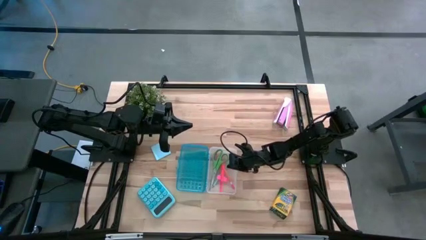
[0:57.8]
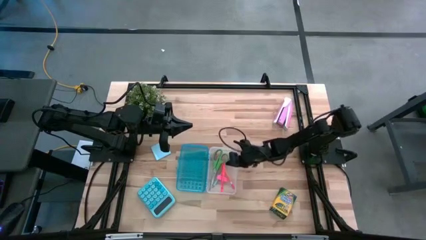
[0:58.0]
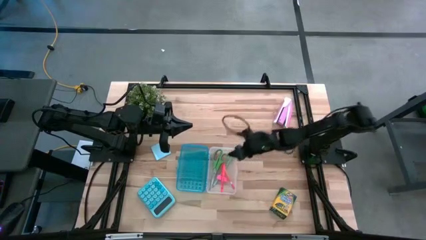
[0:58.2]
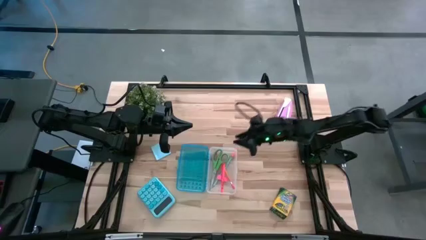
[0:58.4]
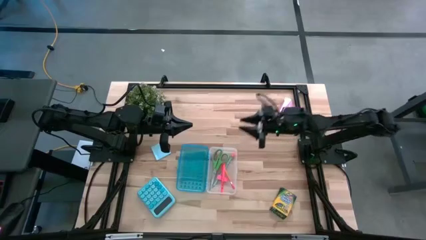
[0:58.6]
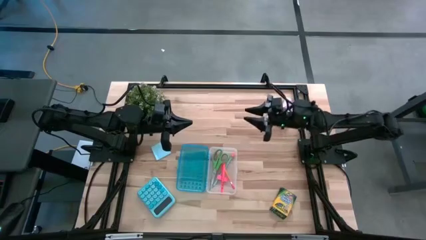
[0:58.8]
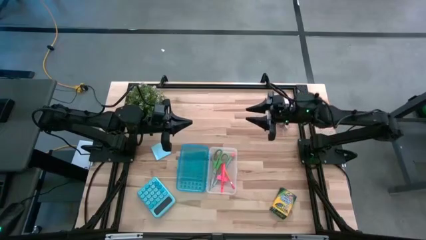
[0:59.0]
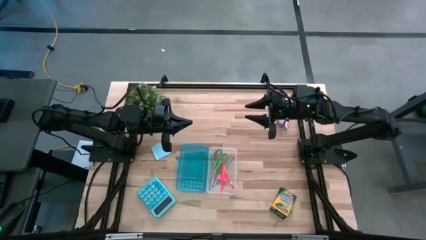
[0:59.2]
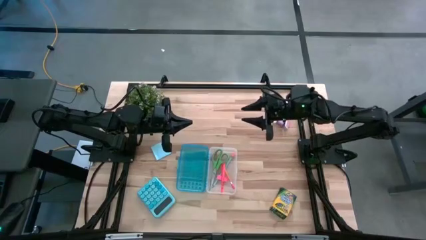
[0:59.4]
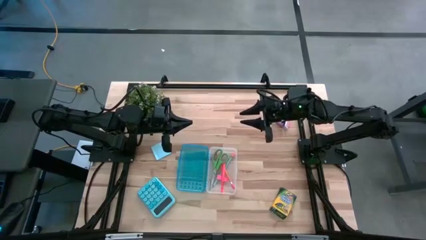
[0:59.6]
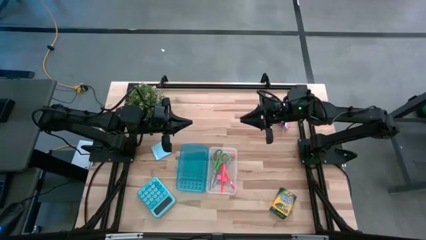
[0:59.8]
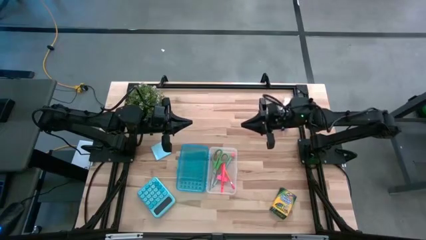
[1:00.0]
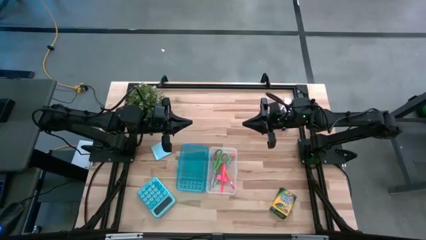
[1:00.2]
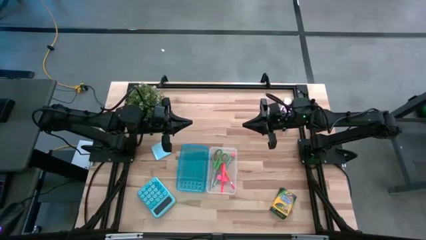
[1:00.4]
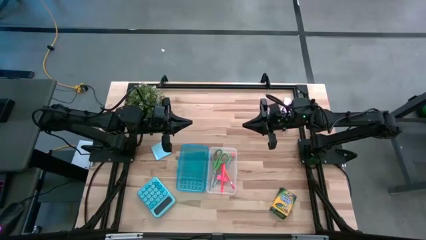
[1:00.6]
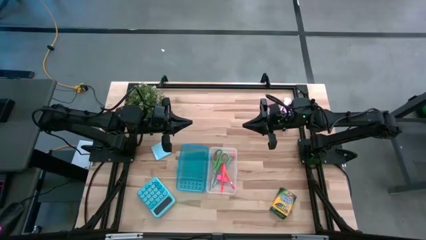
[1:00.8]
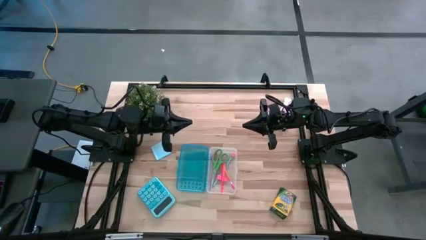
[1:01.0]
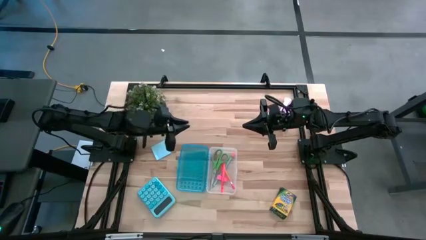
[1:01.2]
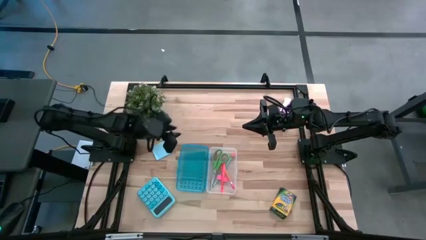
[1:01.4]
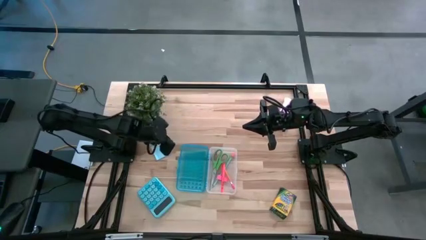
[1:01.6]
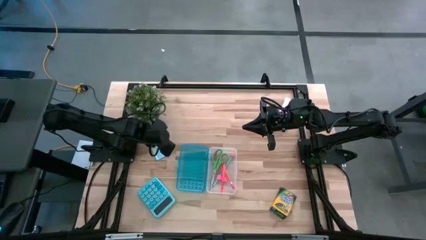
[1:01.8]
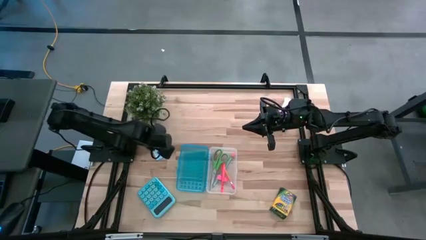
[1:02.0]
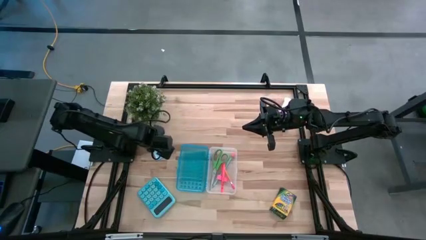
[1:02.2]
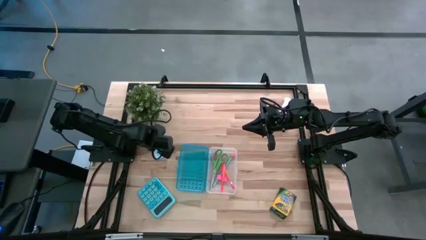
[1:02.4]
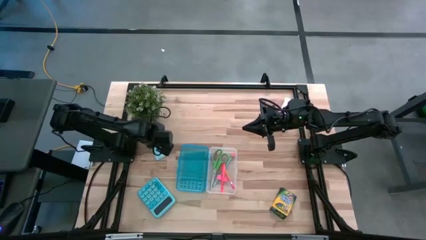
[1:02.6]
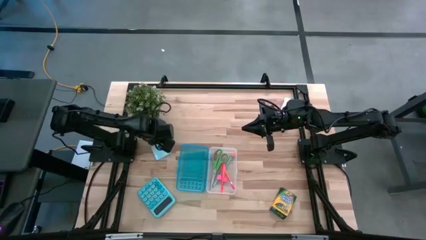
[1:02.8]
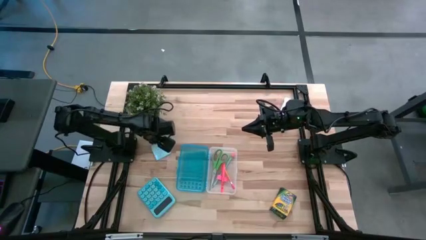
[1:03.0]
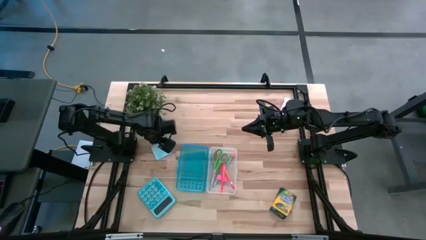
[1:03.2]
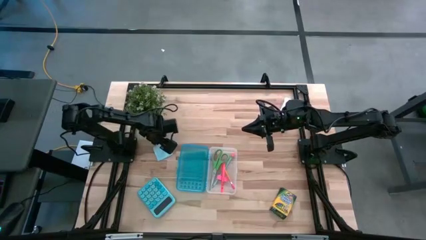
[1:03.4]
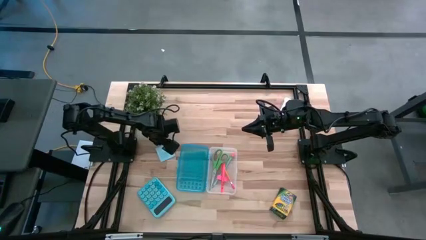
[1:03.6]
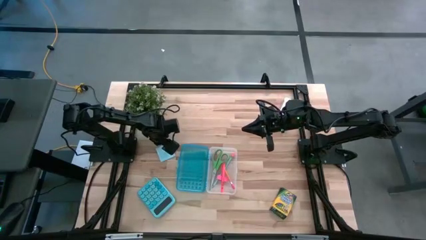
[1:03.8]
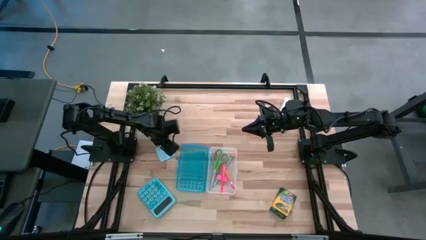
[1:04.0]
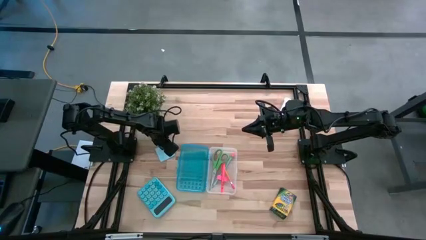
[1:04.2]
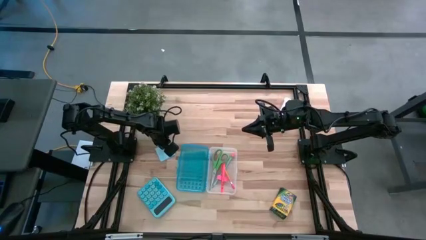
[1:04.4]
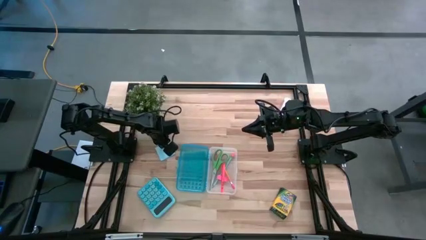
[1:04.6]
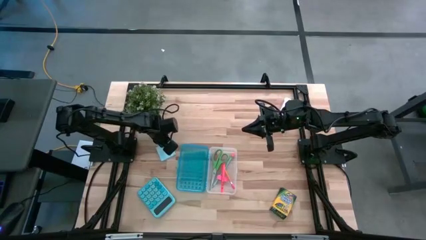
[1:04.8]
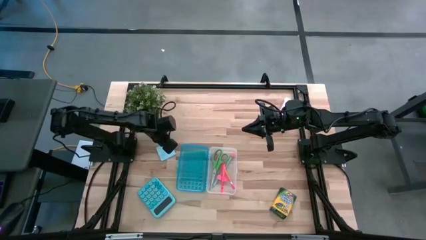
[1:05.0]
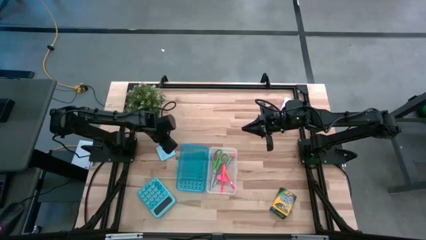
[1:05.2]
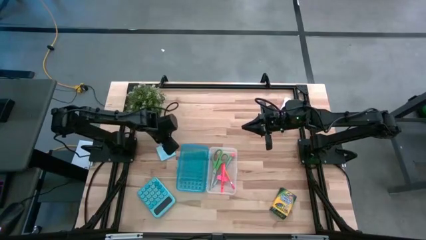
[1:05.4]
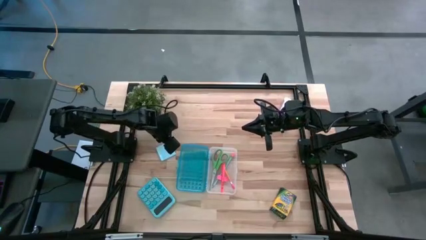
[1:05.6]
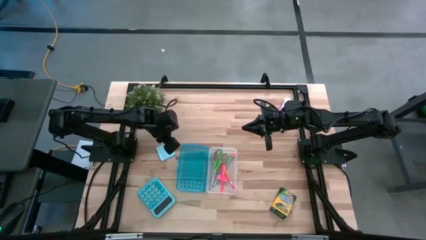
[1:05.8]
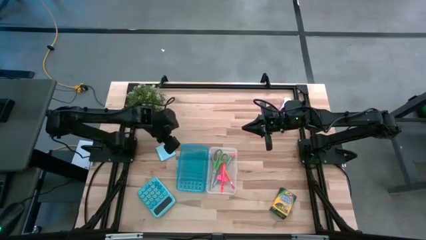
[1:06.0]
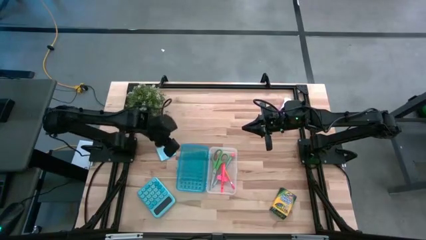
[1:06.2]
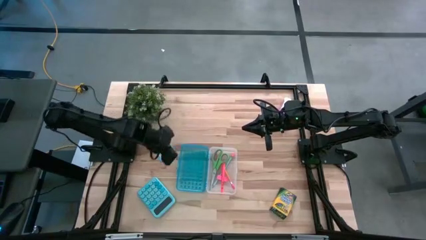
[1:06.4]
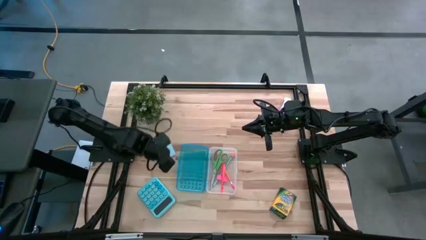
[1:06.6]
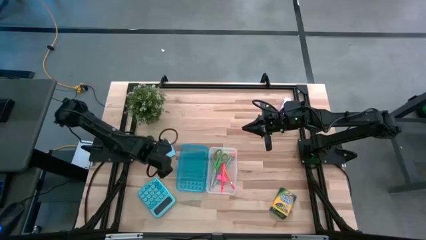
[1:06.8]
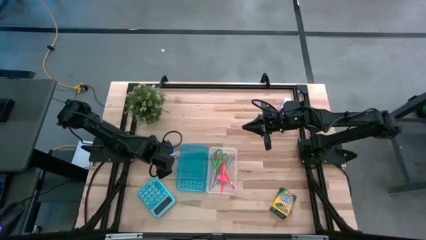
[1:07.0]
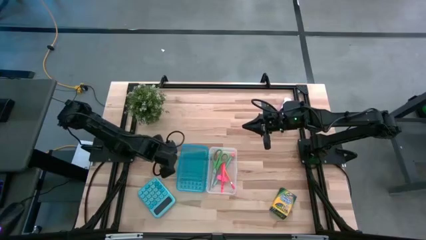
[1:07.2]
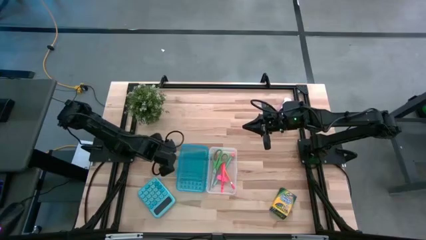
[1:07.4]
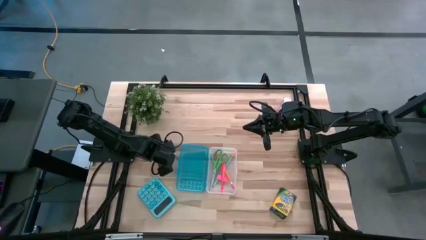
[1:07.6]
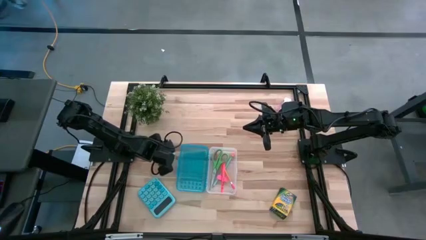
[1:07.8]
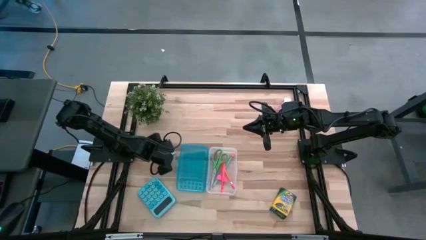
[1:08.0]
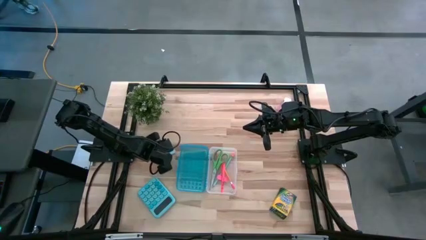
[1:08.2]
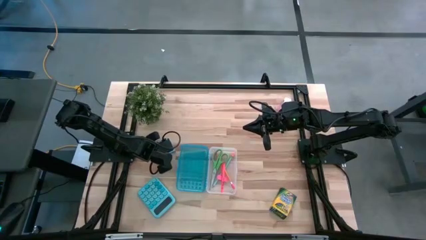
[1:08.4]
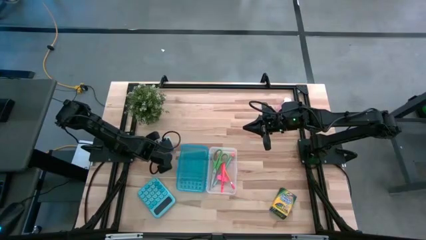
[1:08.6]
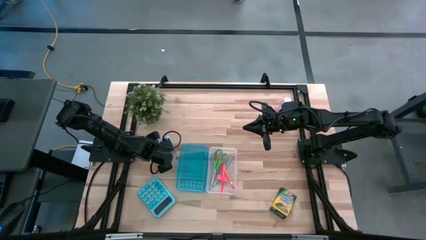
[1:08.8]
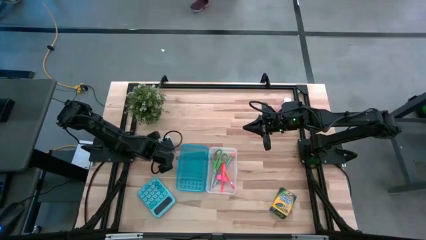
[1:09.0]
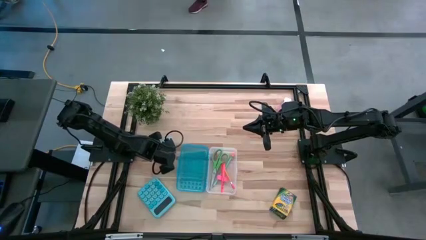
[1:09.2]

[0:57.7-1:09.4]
Task: Pack school essentials
Put the blue sticky notes into the blue supply box

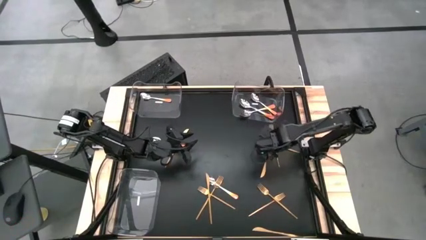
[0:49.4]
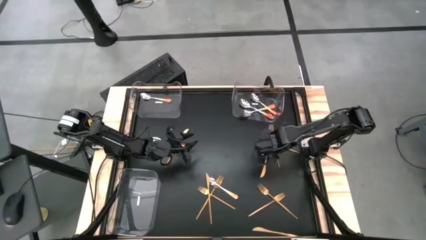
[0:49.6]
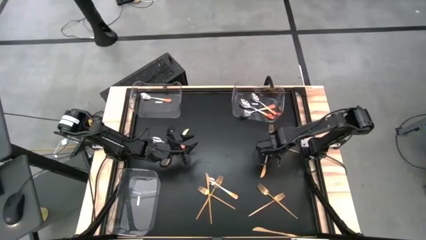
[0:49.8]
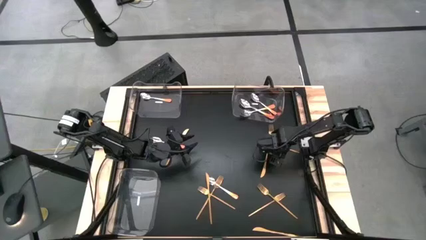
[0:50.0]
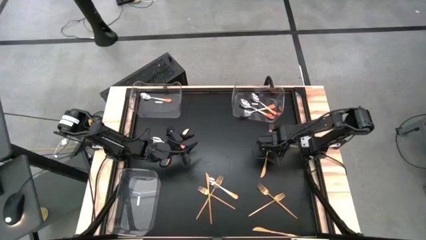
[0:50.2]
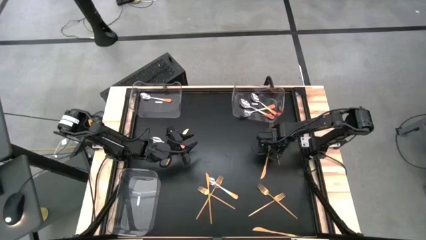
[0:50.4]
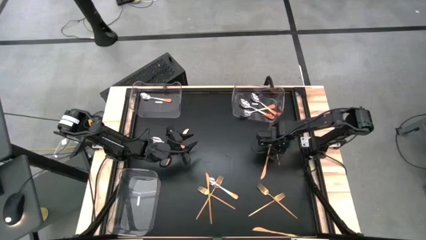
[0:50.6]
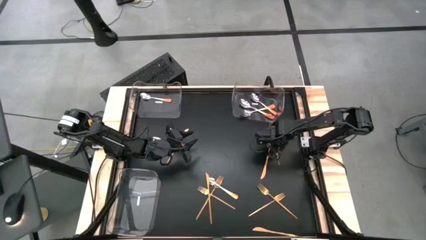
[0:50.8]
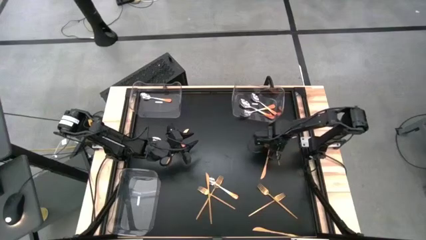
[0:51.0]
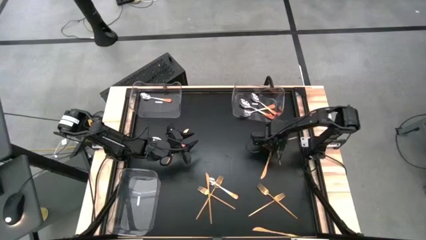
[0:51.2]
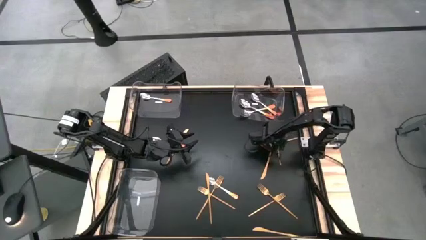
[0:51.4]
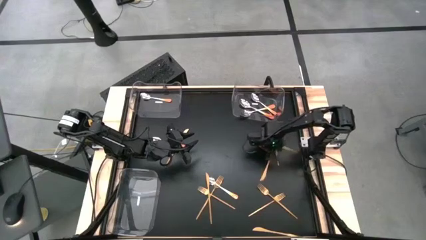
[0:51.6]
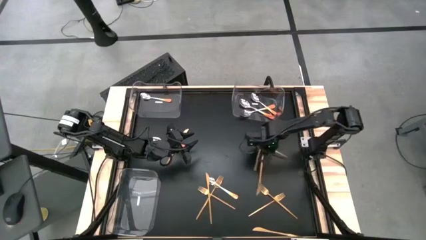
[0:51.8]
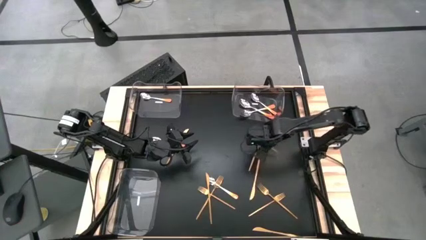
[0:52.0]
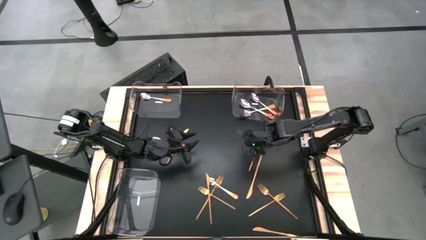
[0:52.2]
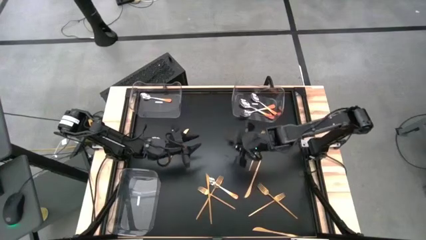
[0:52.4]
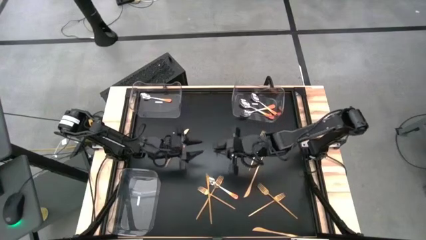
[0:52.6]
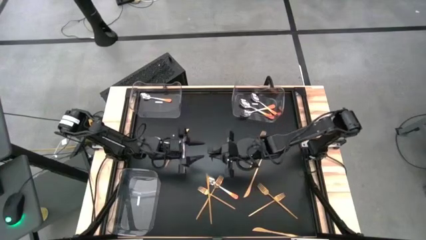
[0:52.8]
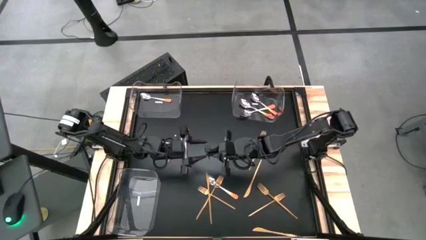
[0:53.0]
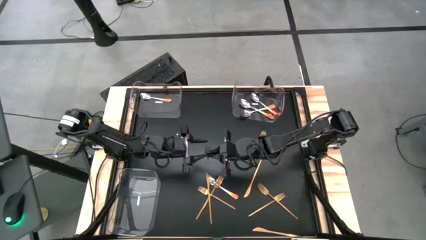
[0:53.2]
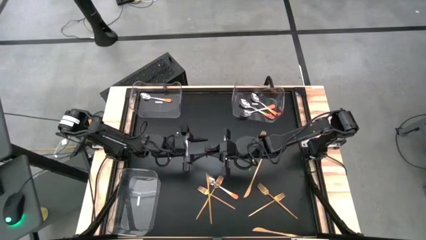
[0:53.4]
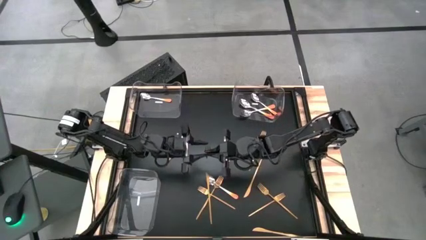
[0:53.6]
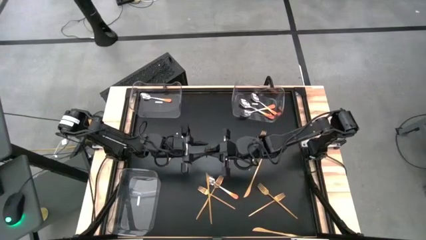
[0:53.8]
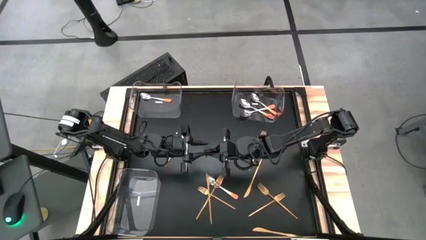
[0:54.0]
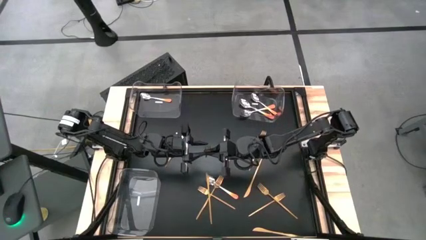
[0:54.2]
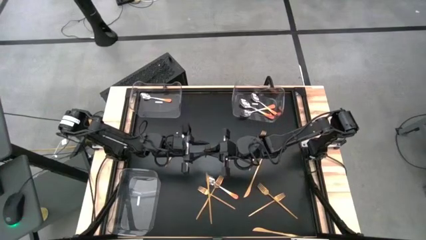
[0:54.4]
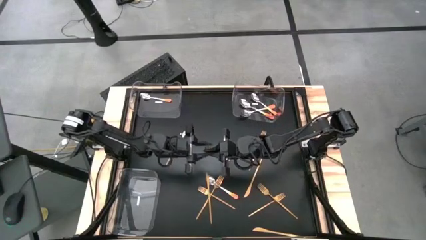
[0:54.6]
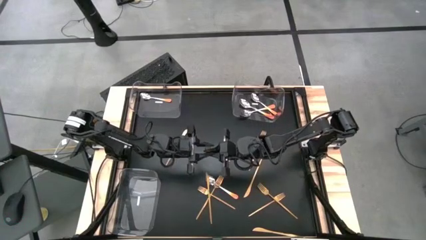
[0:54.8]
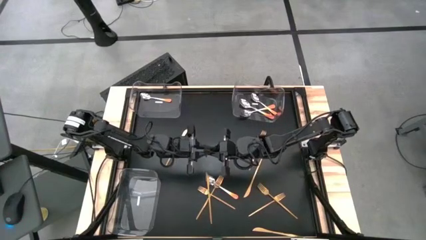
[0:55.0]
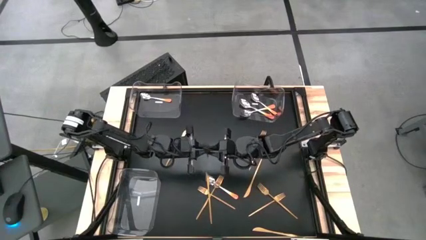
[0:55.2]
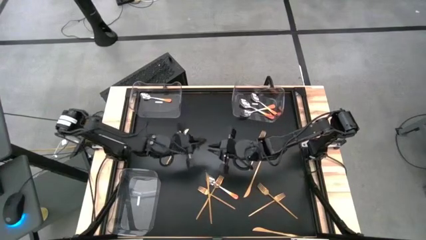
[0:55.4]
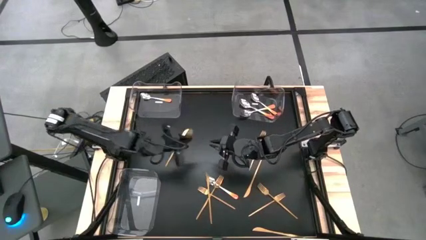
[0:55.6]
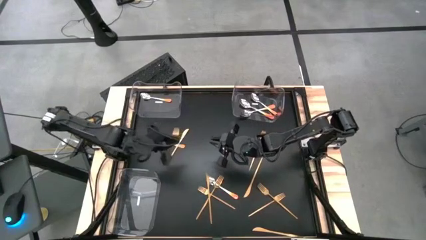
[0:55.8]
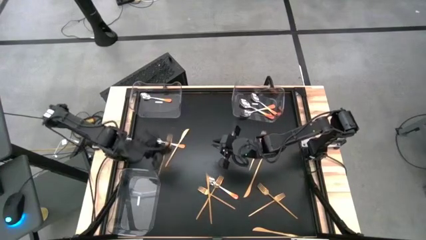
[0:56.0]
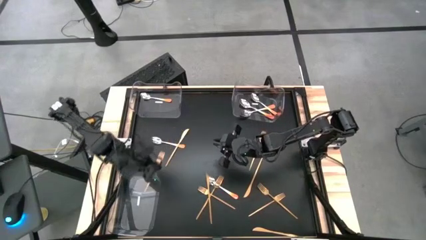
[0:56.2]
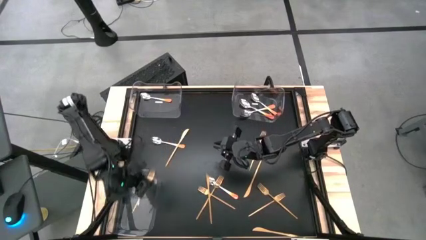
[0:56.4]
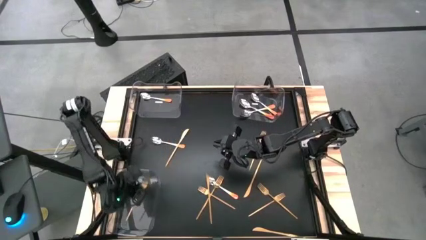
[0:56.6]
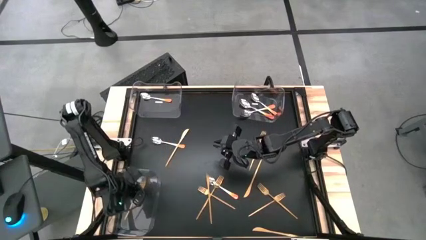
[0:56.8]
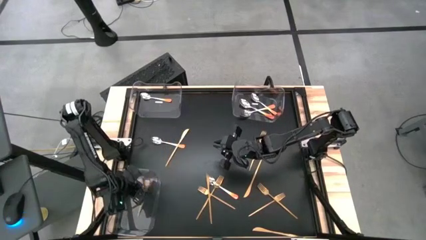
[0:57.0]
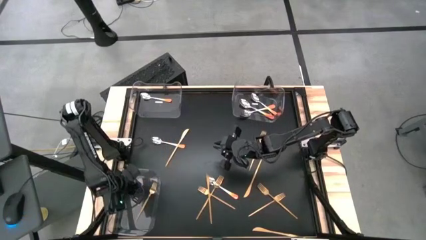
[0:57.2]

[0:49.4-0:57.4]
Task: Sort silverware by color (type)
Put the gold fork into the bottom left transparent bin
